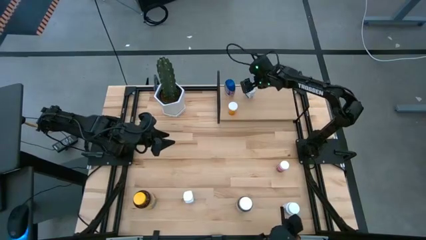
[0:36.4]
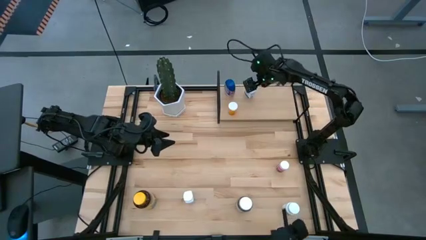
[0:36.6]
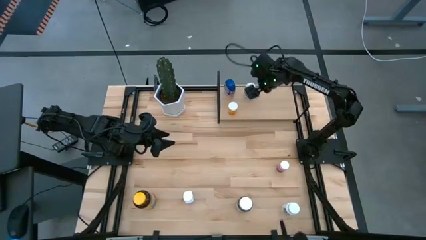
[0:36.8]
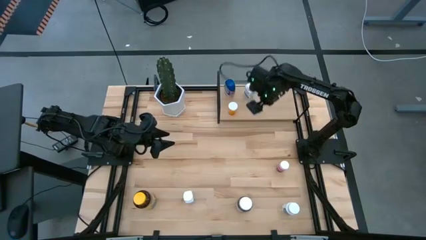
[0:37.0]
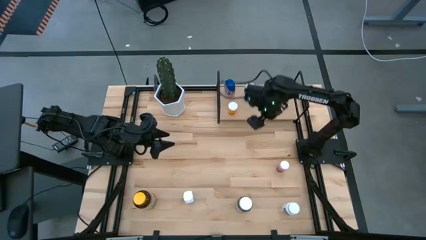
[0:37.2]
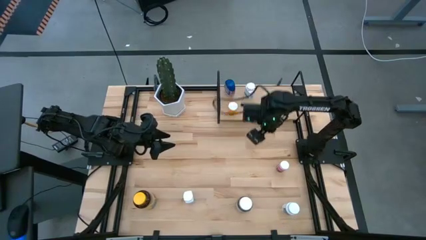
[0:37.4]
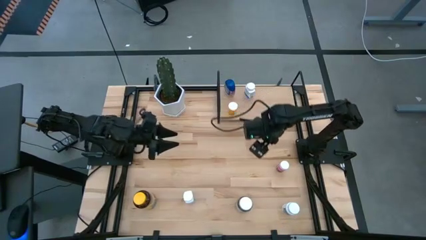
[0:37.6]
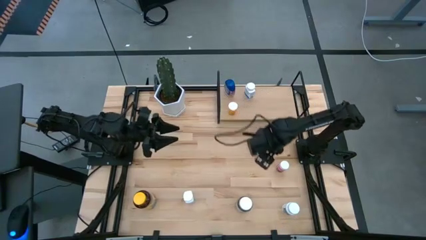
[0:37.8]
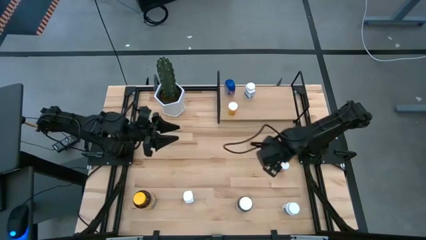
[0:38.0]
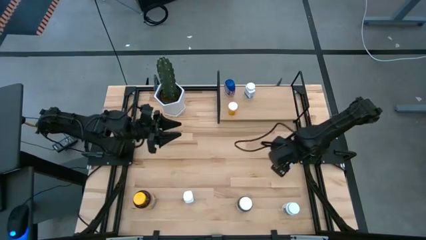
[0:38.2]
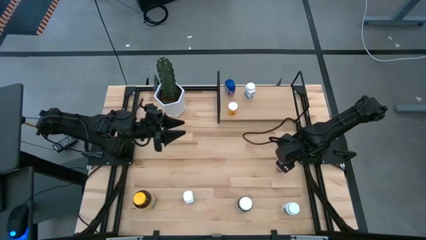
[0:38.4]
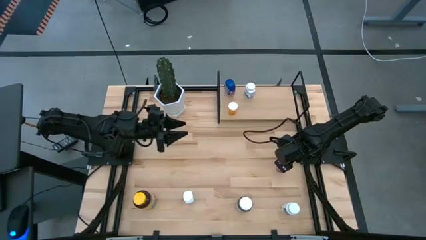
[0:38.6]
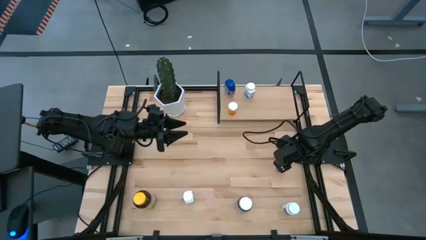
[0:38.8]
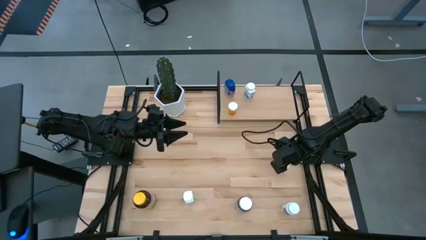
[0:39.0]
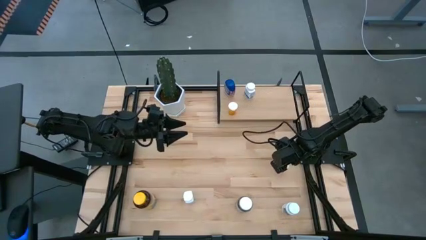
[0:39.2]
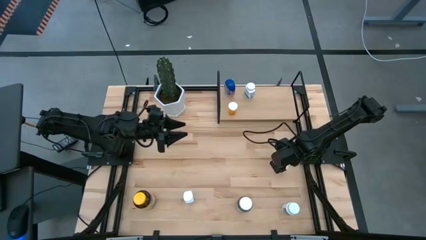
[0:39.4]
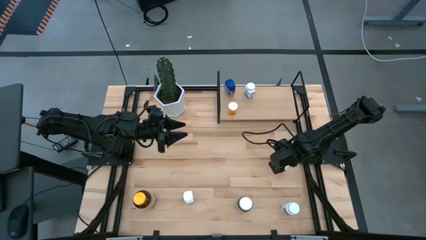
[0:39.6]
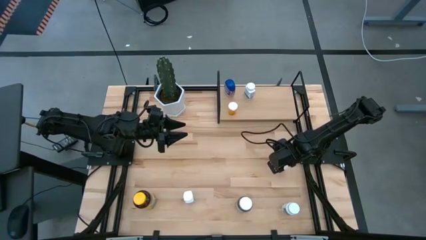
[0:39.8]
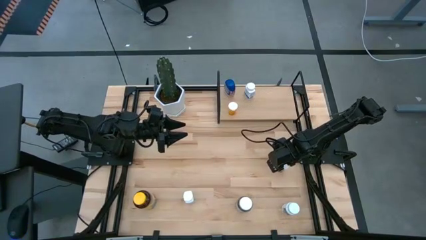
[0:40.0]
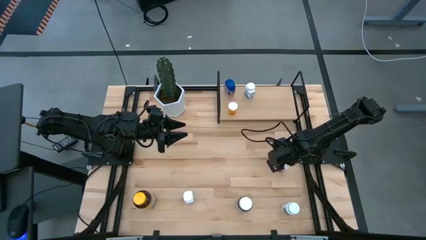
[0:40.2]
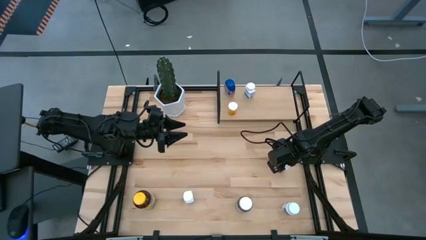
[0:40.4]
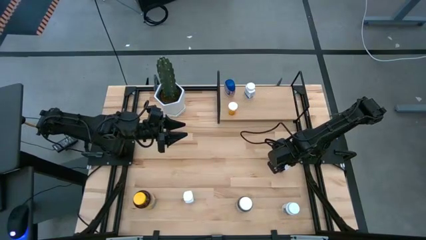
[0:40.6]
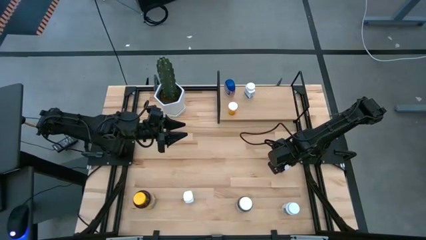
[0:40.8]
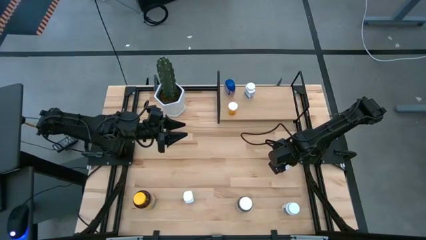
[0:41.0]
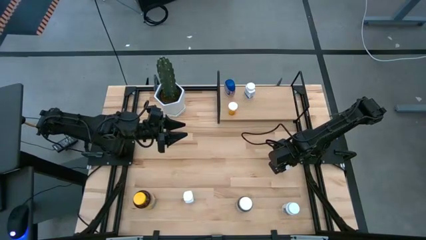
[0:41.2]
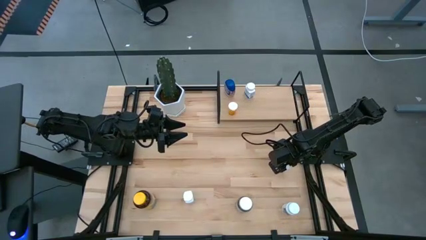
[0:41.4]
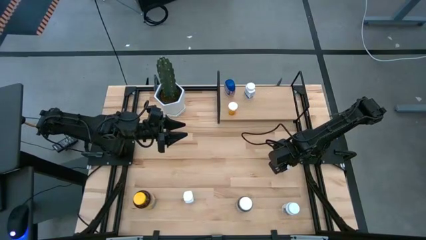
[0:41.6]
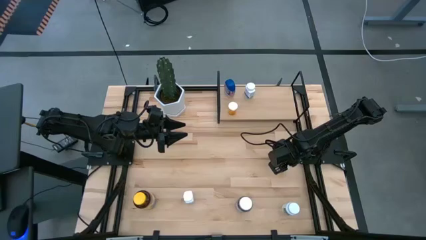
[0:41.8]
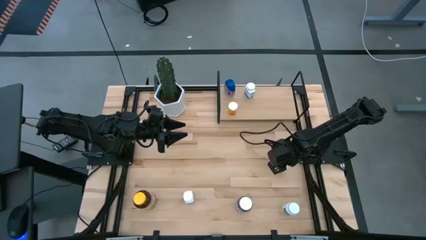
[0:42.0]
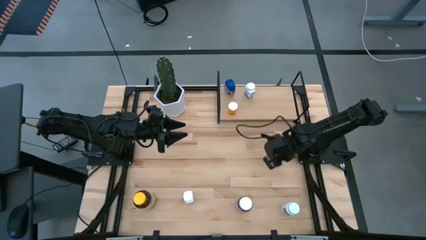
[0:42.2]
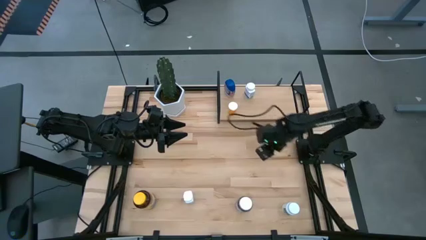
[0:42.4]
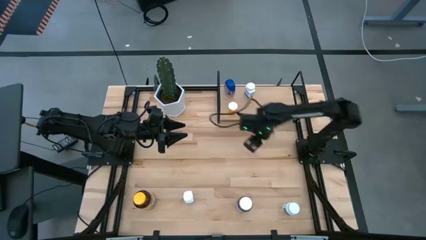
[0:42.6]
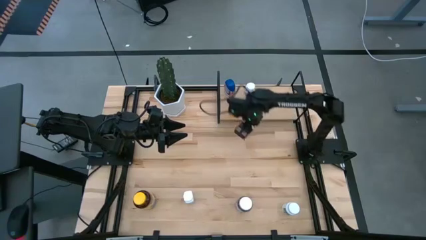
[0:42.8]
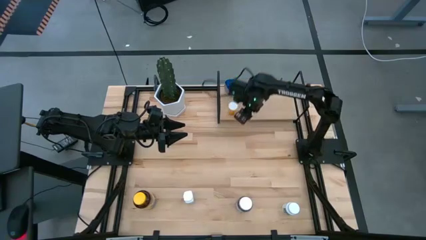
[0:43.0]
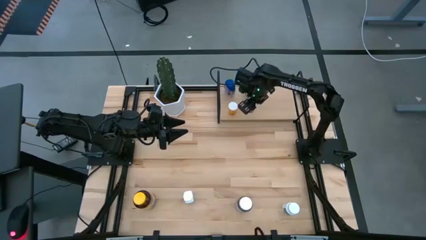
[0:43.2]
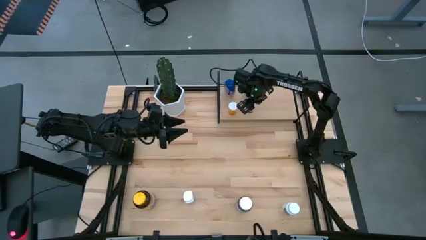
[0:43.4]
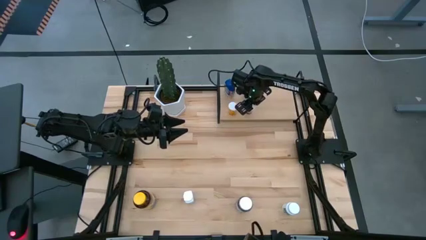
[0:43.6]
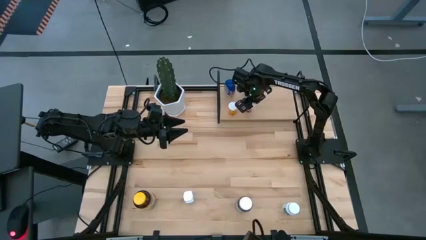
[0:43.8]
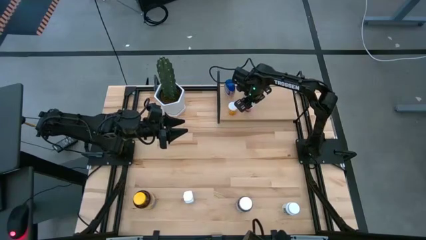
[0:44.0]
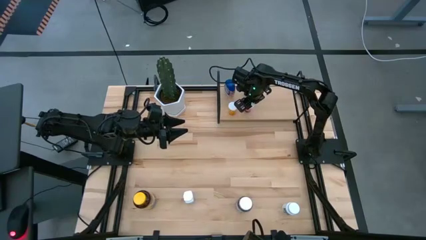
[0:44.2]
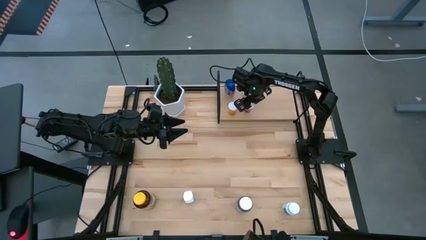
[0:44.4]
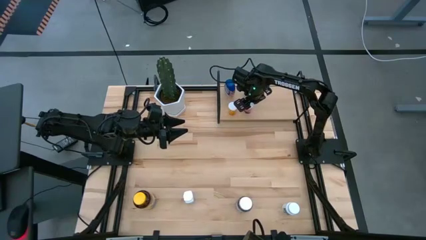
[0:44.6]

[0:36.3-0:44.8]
Task: Pick and place medicine bottles onto shelf by color
Put the pink pill bottle on the shelf

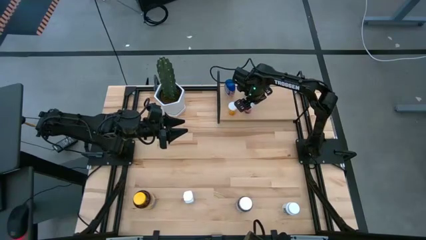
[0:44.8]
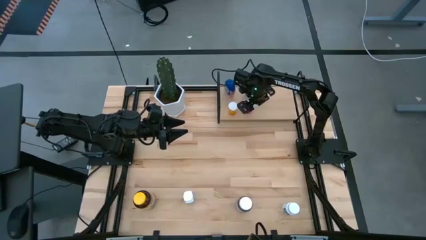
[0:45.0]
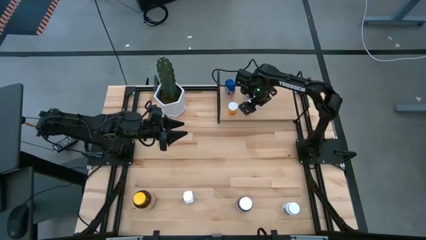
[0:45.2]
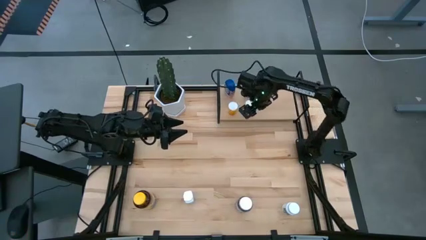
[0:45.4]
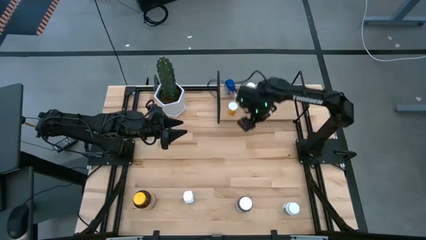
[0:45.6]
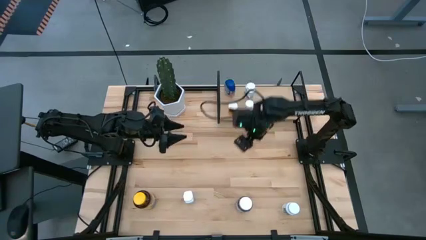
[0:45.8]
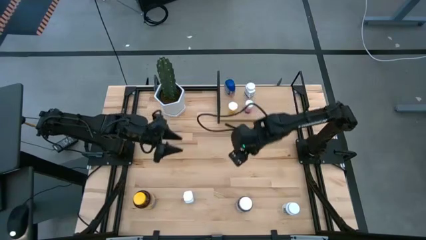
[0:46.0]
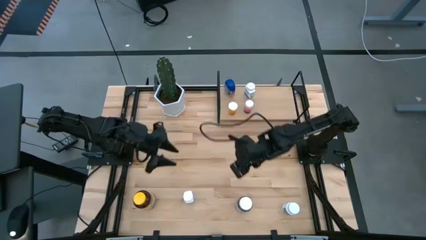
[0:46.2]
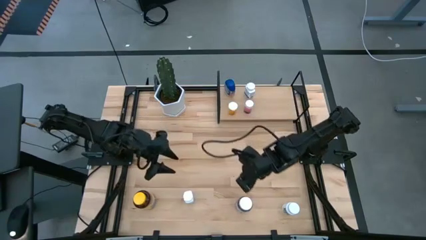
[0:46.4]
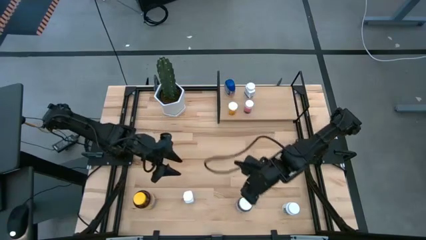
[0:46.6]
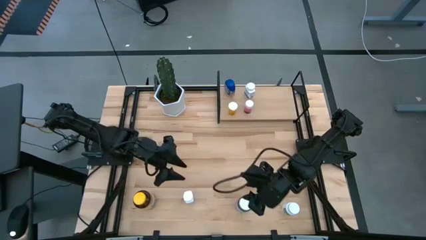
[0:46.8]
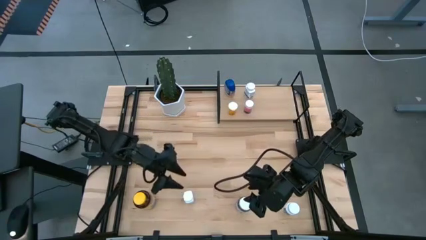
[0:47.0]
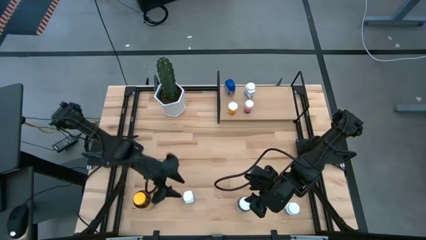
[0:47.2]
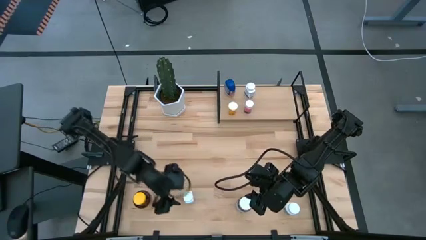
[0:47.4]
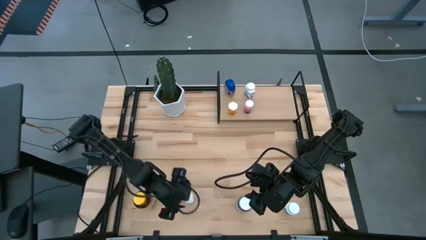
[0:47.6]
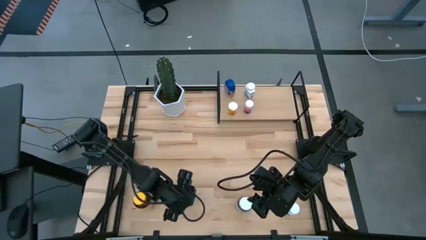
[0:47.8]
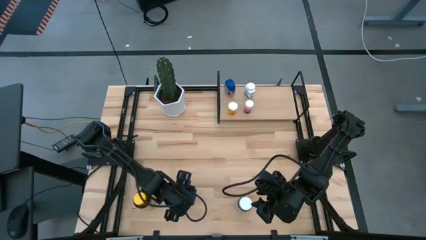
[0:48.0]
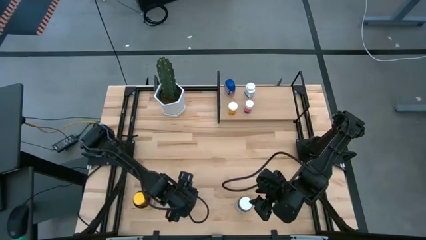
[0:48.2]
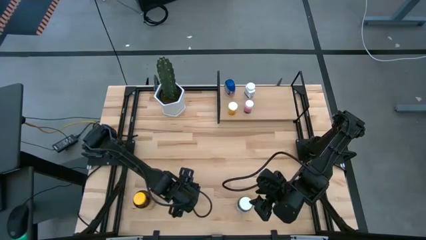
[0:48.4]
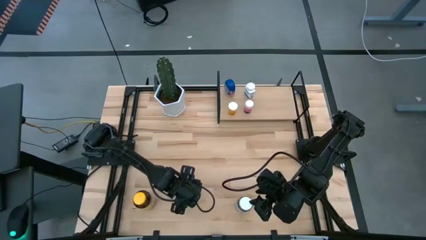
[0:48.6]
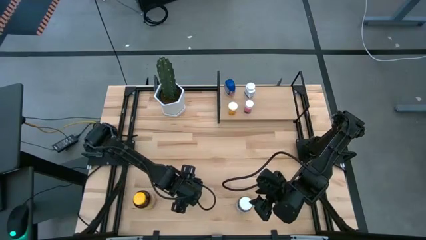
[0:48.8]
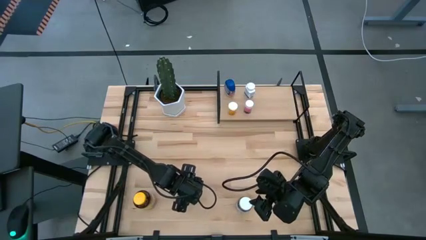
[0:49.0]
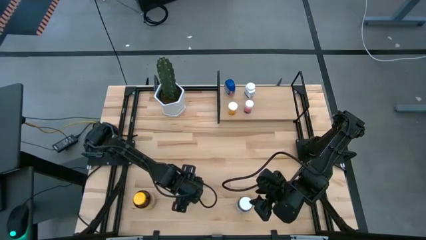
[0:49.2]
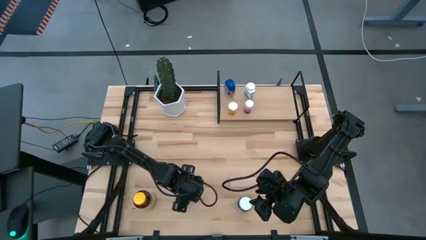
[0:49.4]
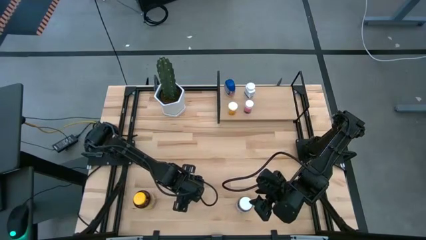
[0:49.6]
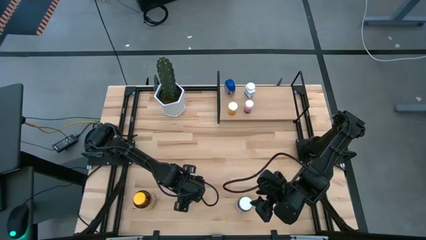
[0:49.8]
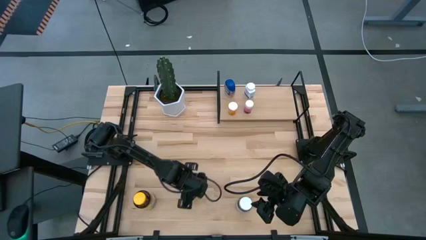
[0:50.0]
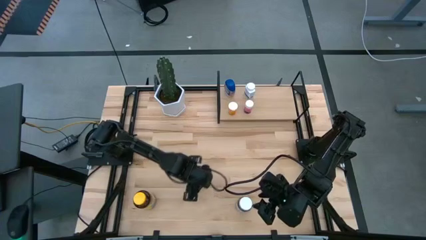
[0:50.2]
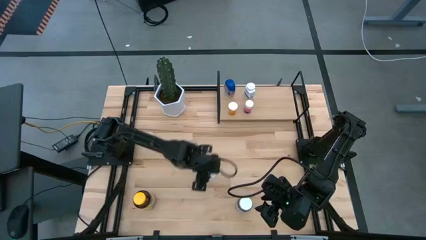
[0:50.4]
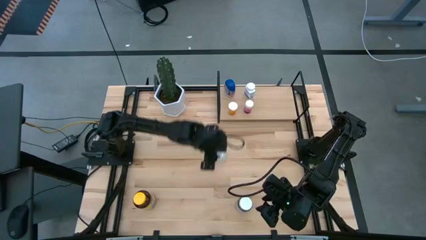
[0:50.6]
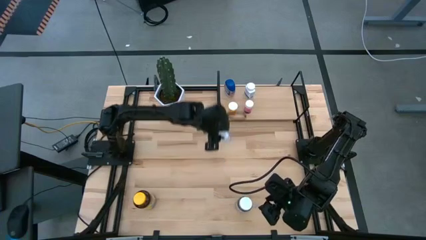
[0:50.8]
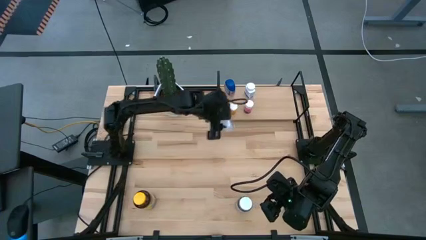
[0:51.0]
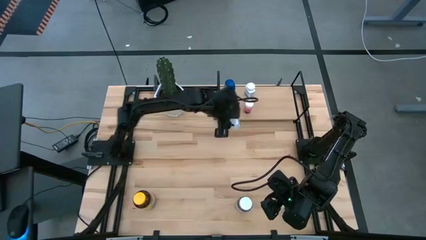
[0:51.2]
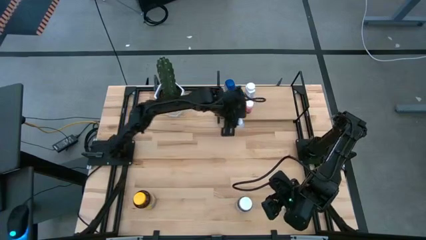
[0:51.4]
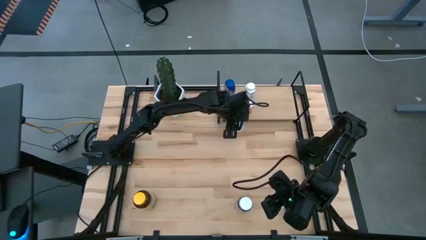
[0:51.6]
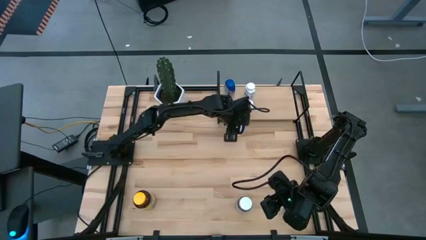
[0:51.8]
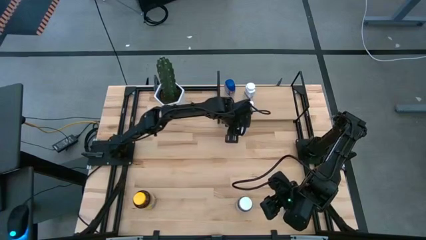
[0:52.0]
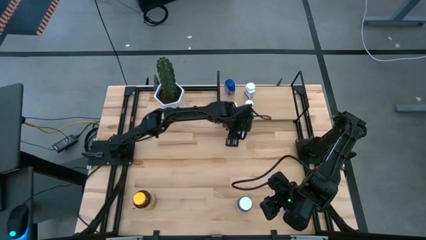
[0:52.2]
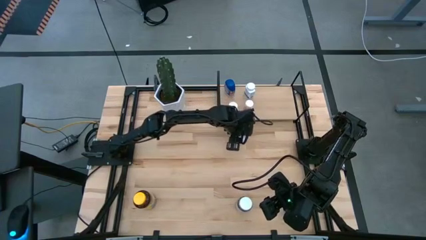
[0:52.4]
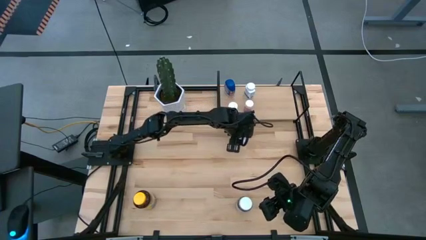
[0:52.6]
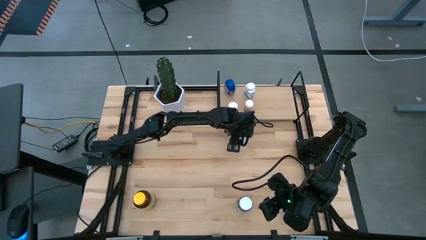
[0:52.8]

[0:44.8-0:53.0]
Move the white pill bottle below on the shelf
